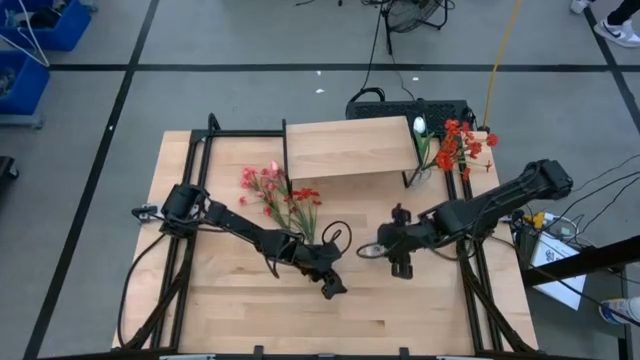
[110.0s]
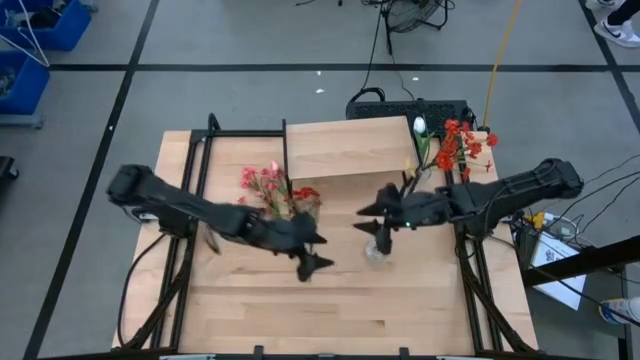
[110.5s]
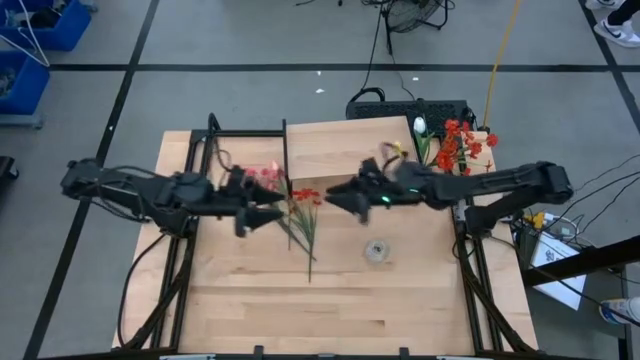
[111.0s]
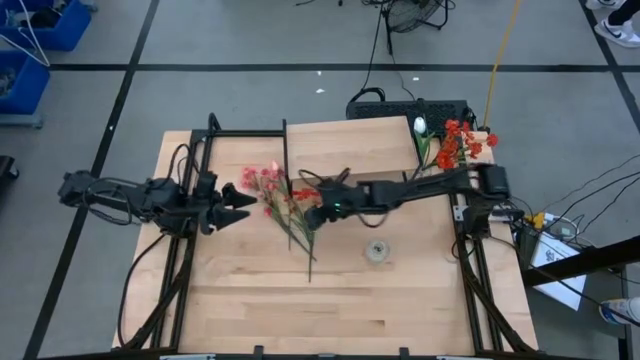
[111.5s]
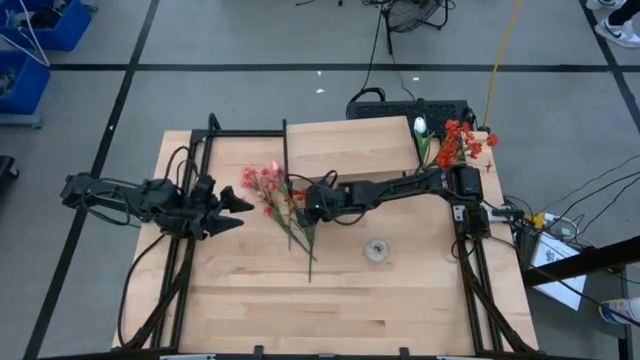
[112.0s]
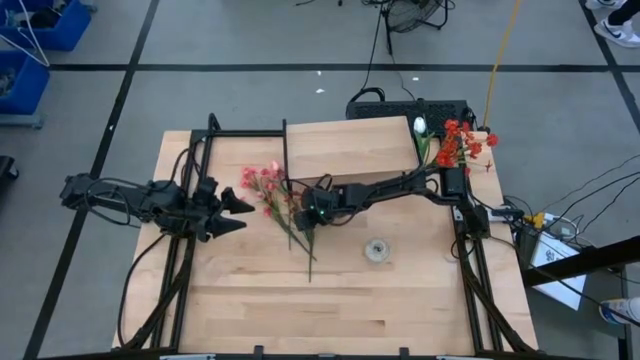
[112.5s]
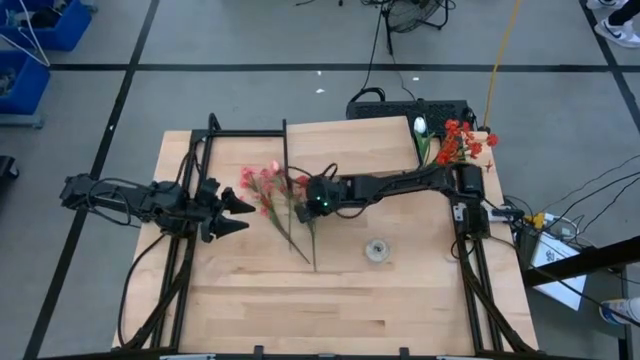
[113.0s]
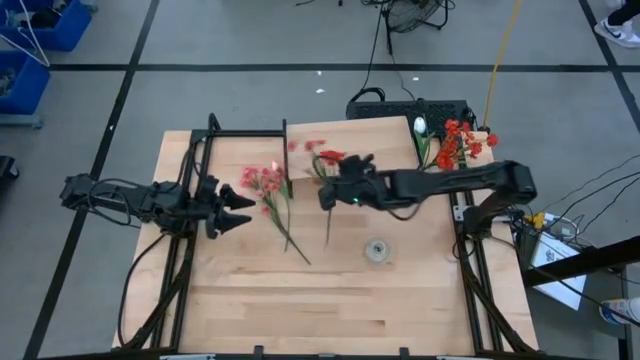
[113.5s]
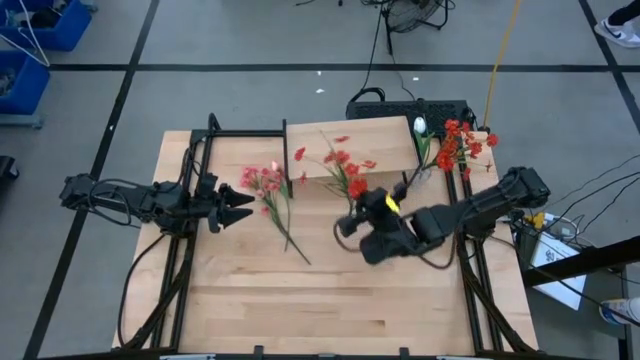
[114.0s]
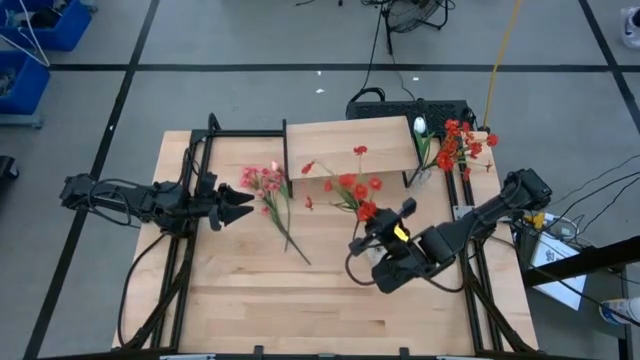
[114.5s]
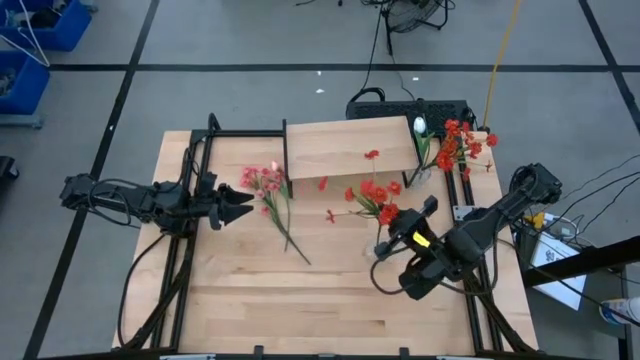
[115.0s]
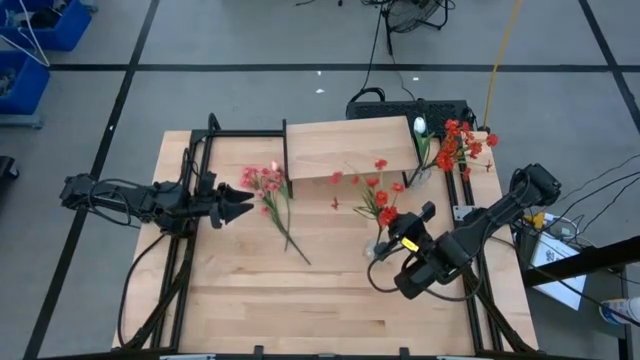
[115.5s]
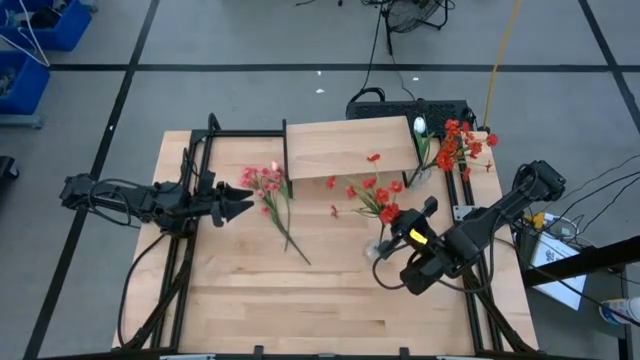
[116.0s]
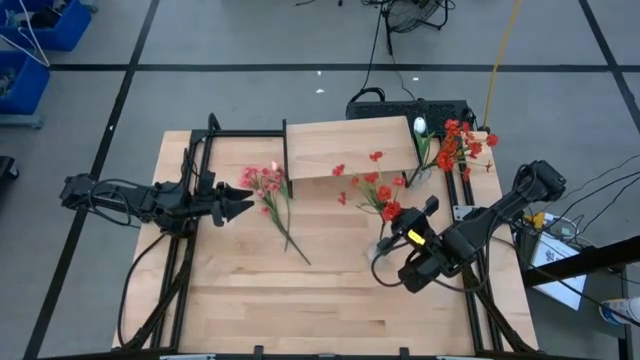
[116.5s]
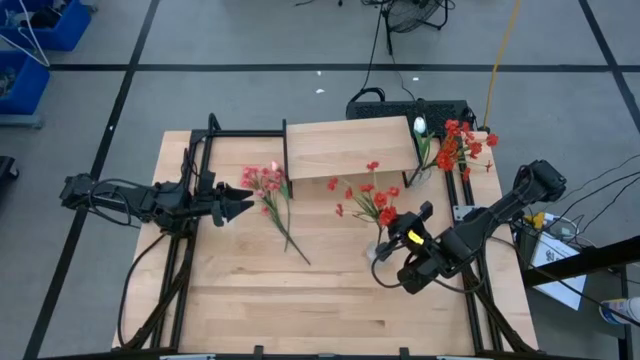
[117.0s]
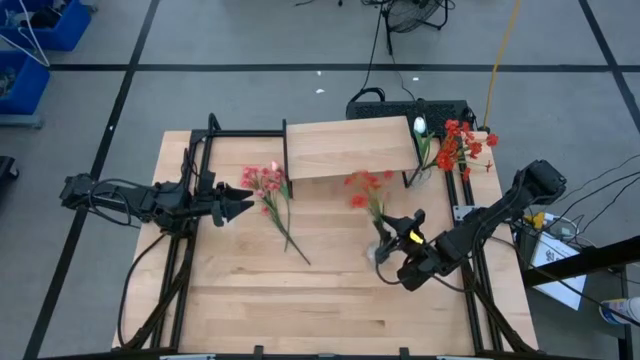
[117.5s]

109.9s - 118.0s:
Task: Pick and place flowers into a vace then onto a shelf
Put the orange flowers into the bottom transparent bin

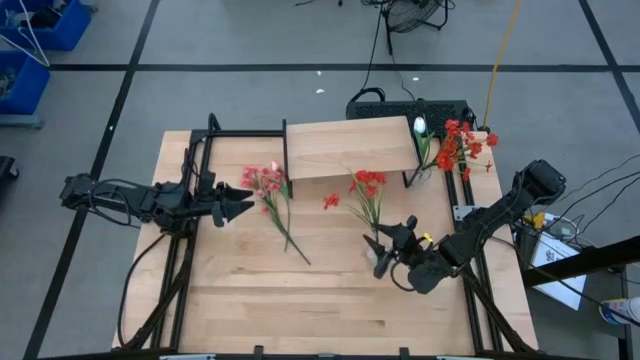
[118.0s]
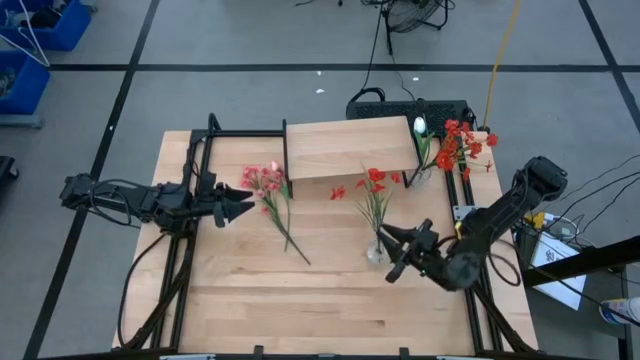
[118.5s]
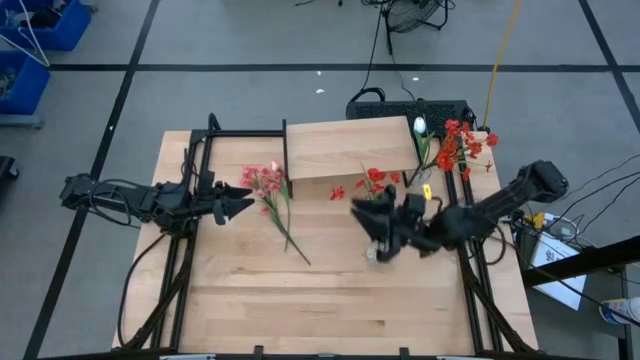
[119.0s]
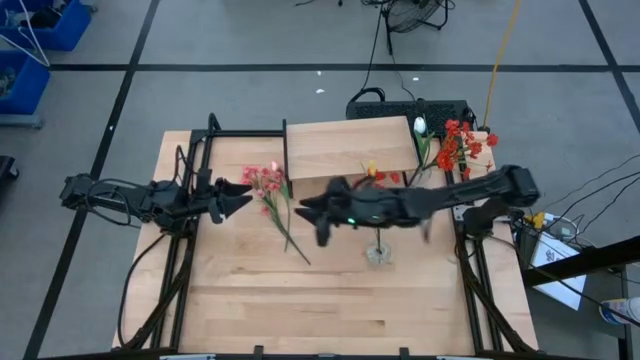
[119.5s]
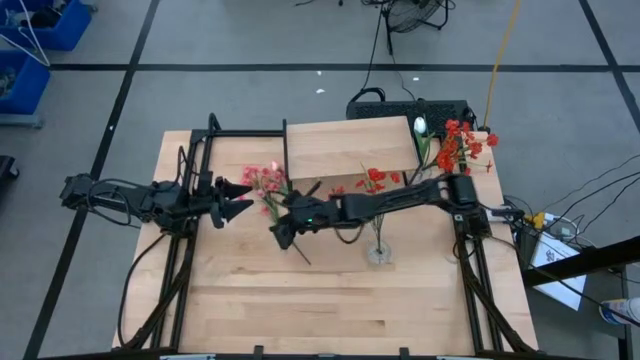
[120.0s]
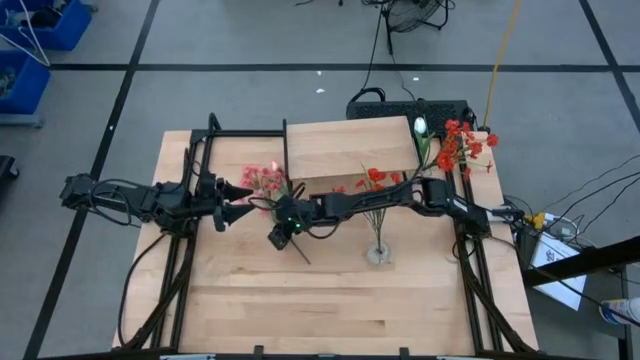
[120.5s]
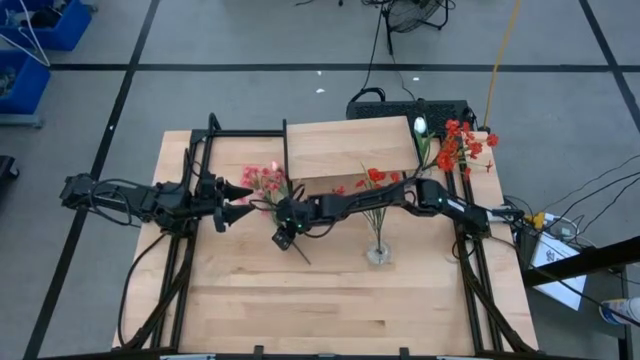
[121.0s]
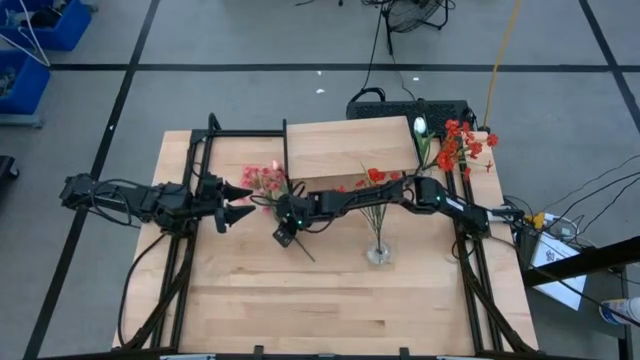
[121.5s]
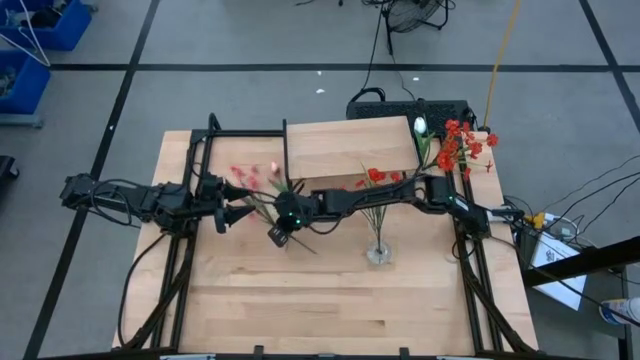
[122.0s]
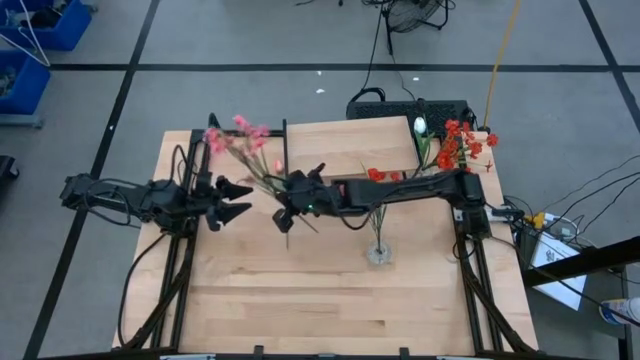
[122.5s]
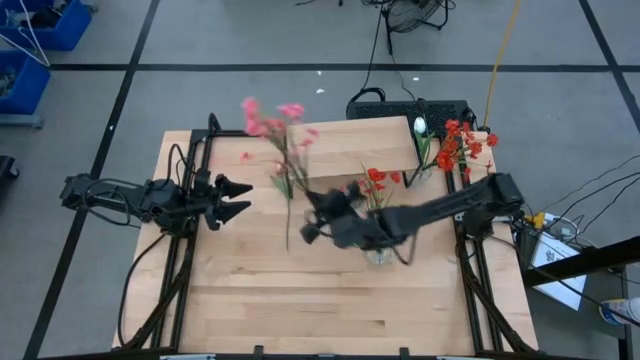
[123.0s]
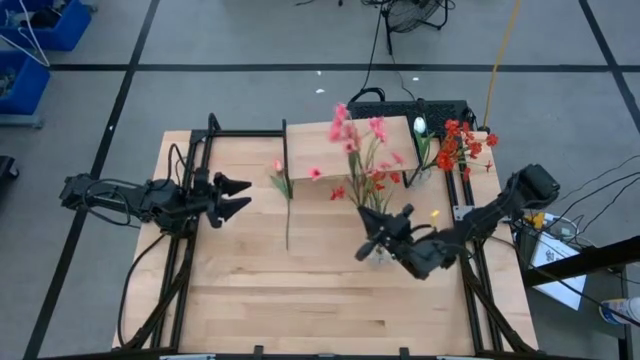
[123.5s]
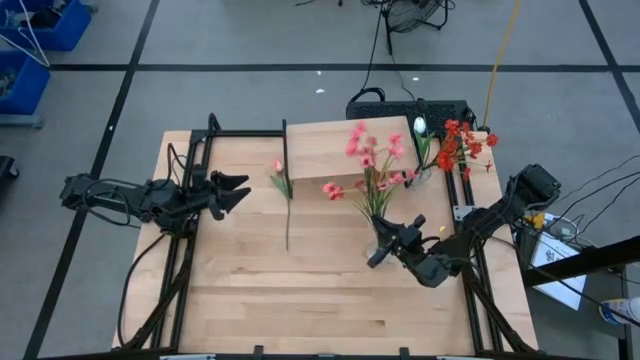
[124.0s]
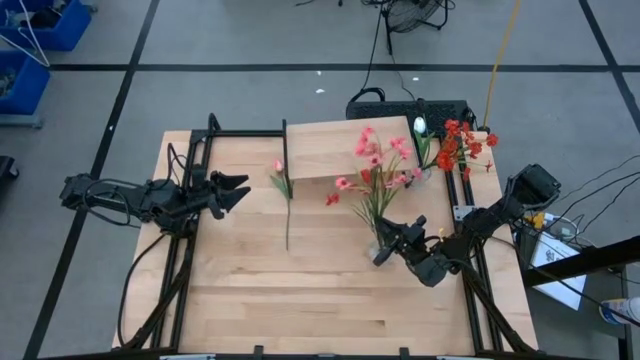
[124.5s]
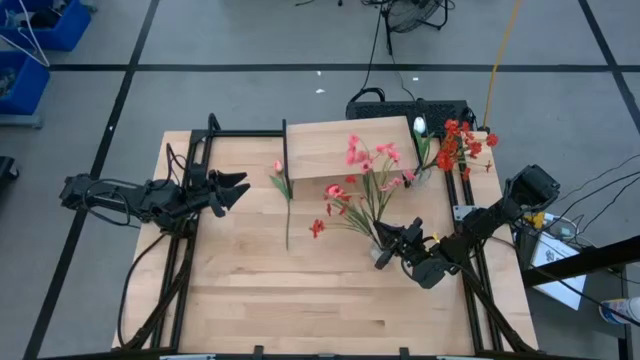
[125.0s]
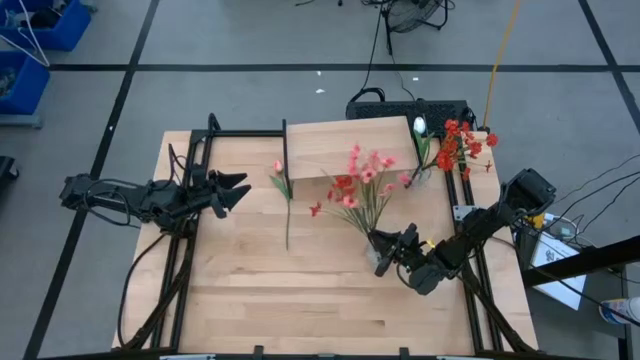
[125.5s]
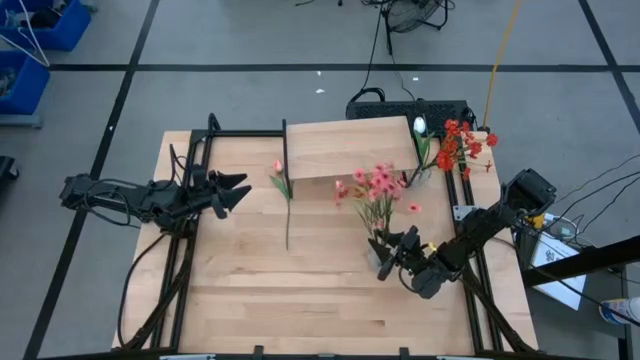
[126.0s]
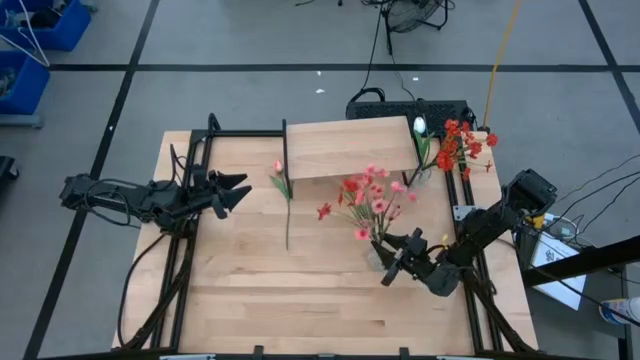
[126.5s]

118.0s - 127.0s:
Put the pink flowers into the bottom transparent vase

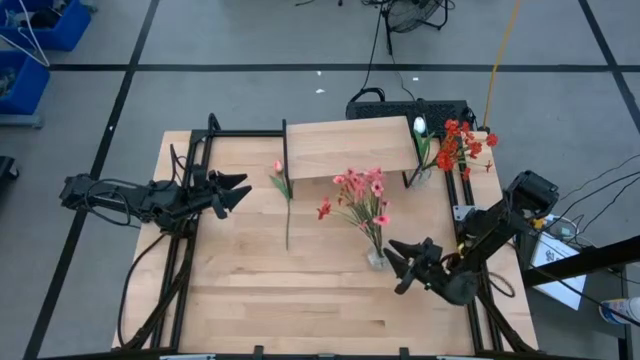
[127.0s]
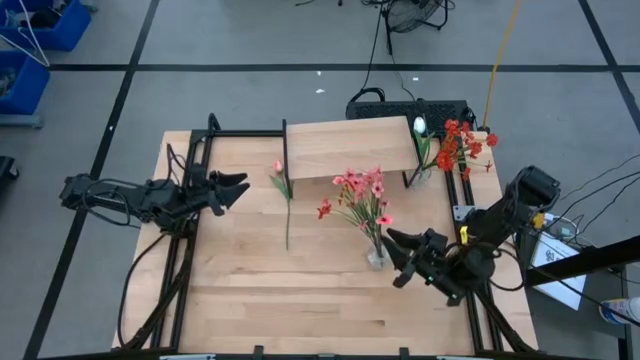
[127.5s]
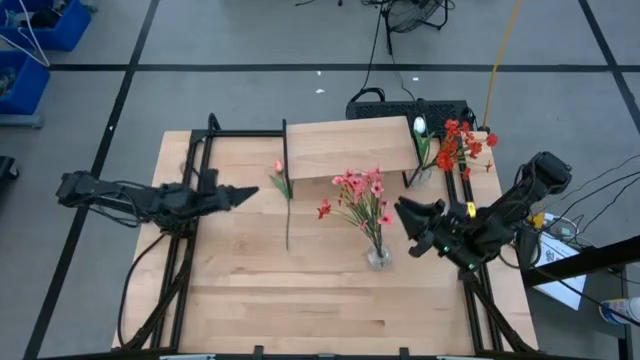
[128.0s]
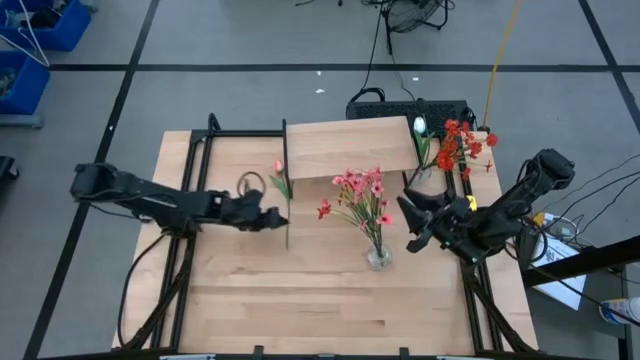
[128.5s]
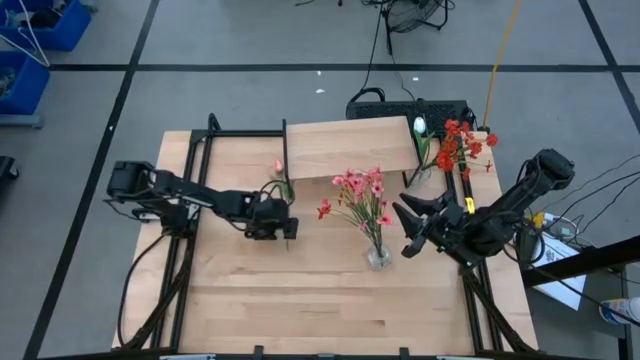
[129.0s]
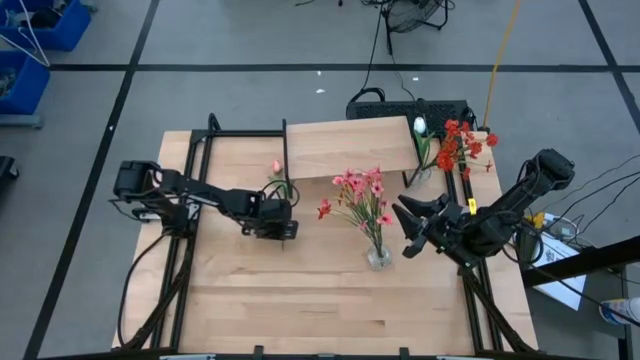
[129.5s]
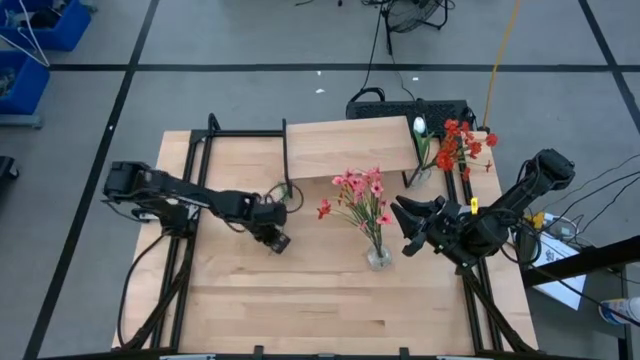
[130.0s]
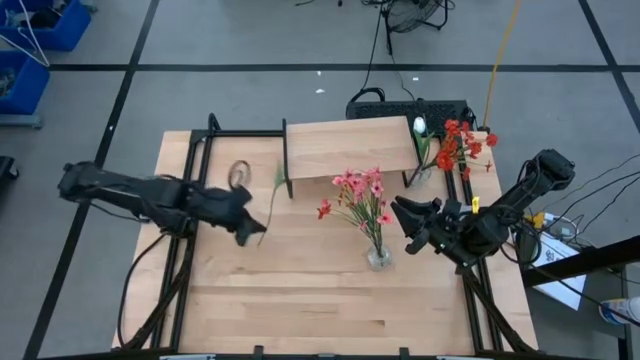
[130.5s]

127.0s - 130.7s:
Put the pink flower into the bottom transparent vase
